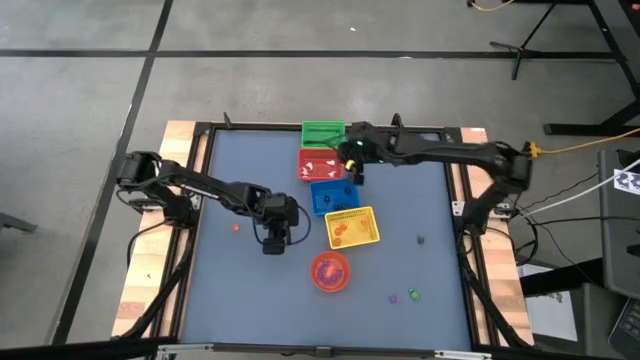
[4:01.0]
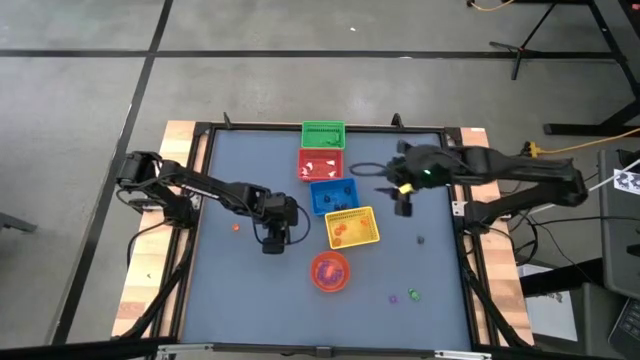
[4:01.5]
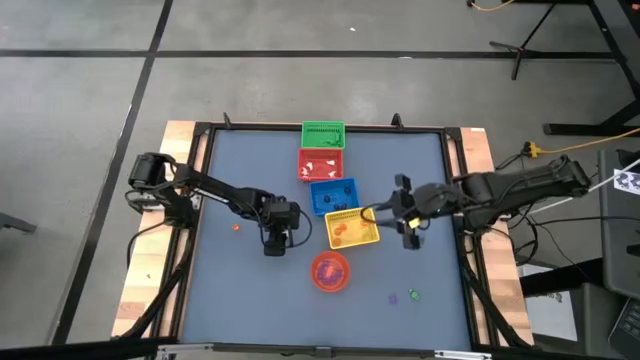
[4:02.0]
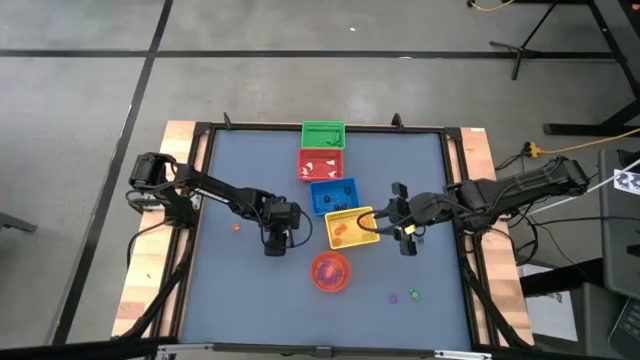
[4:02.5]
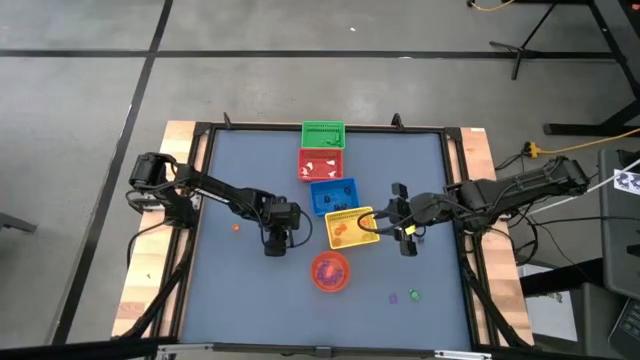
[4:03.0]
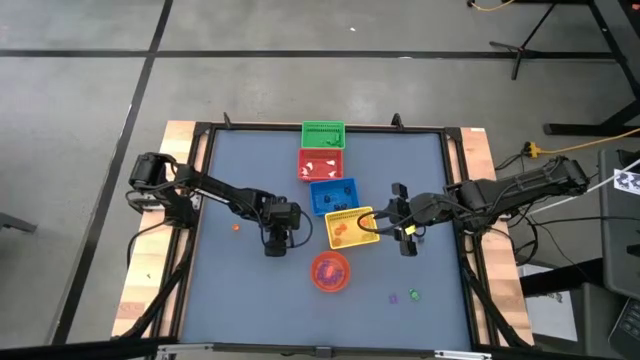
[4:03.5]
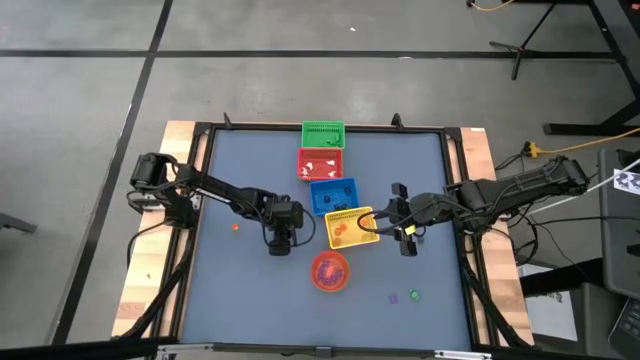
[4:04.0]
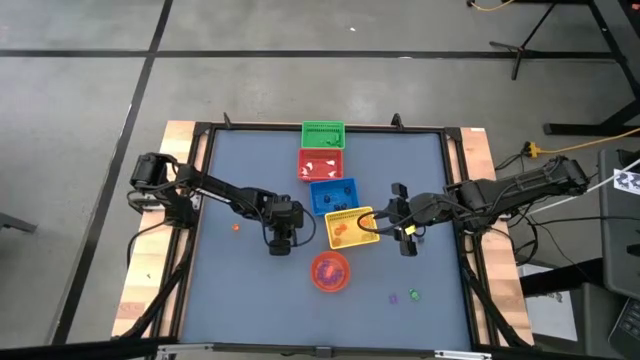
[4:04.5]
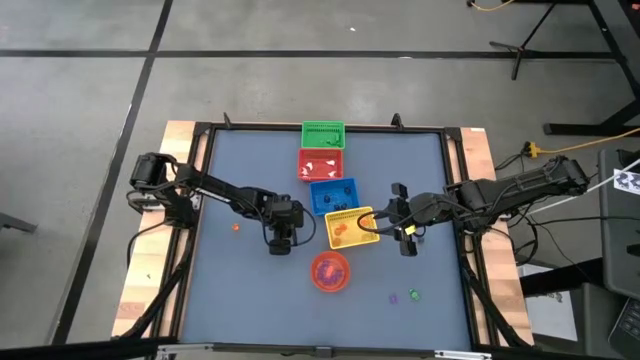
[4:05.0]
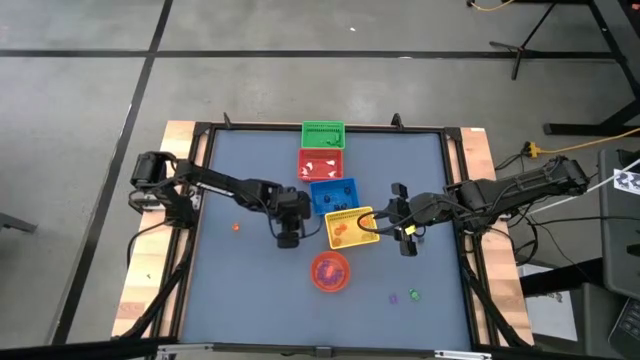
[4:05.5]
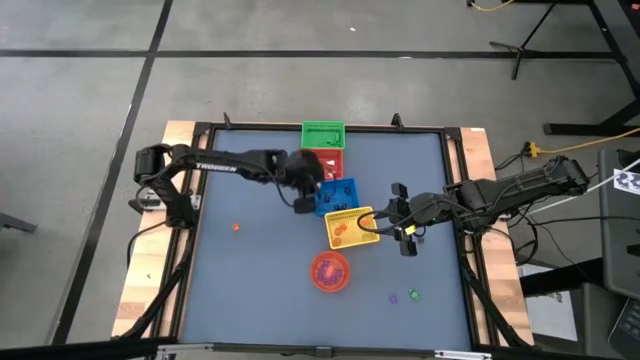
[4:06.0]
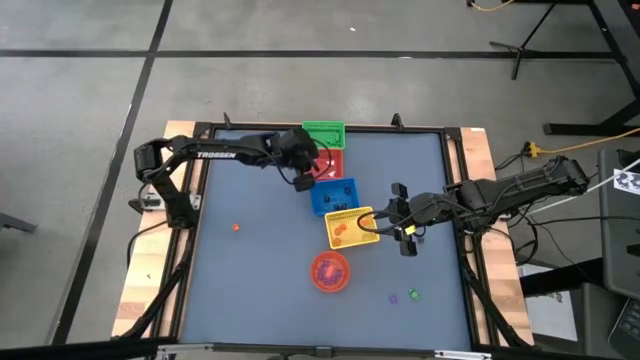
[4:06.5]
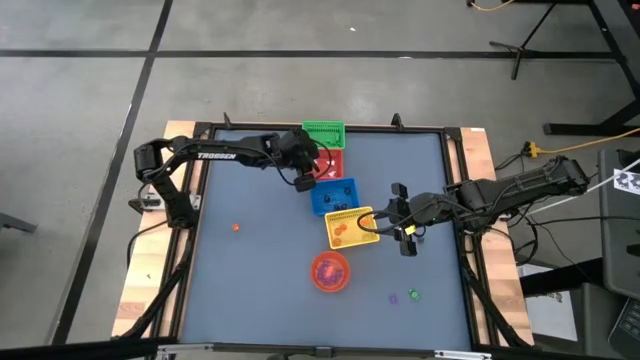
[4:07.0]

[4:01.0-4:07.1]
Task: Sort Halloween decoration
Put the white ghost toy into the red bin

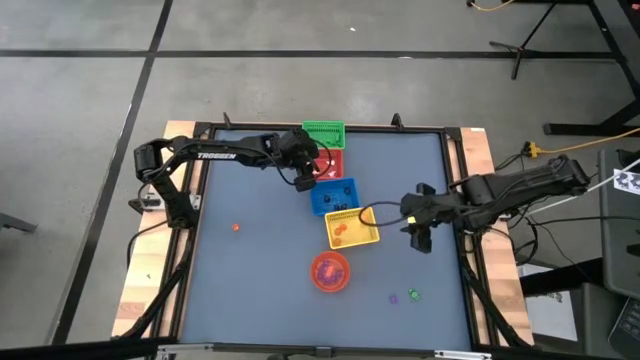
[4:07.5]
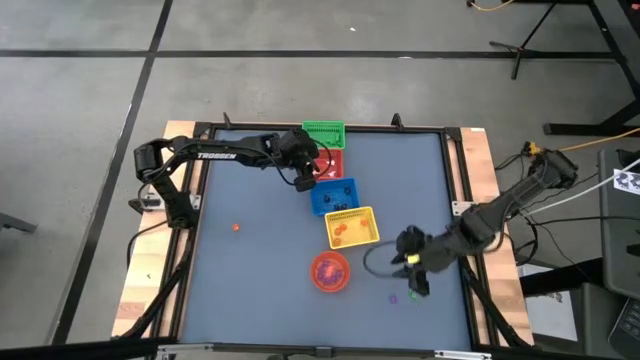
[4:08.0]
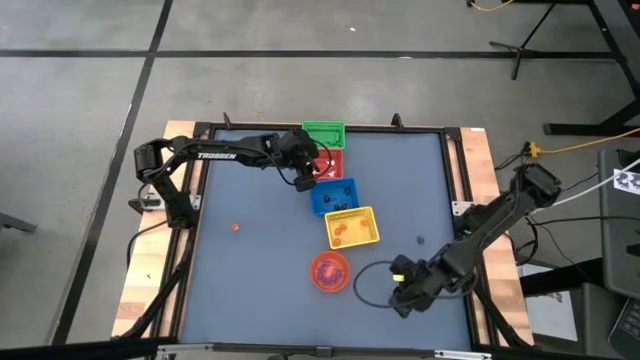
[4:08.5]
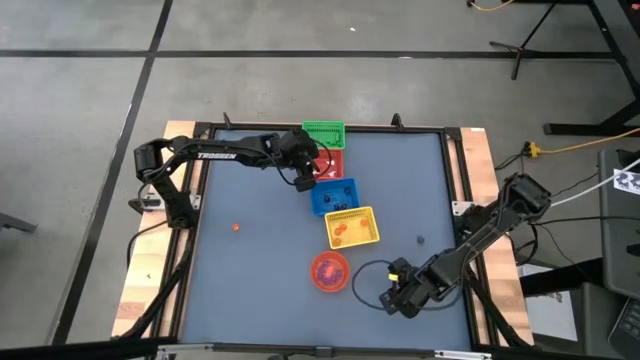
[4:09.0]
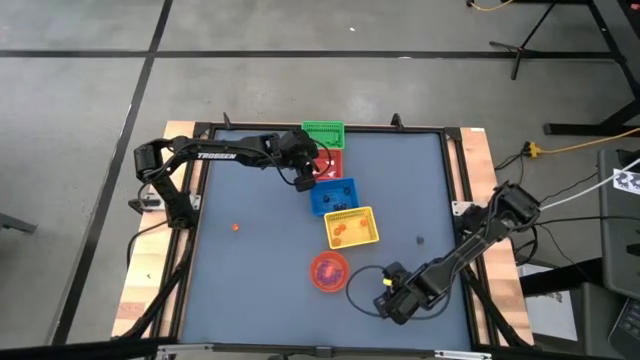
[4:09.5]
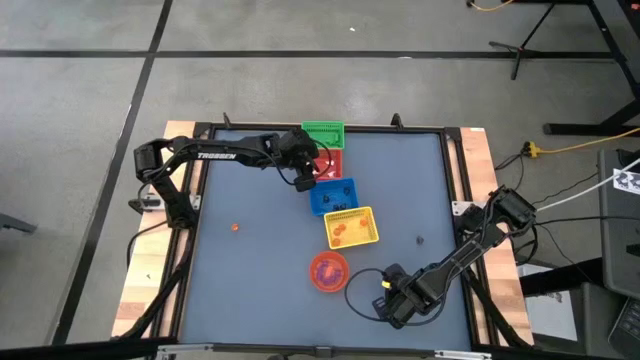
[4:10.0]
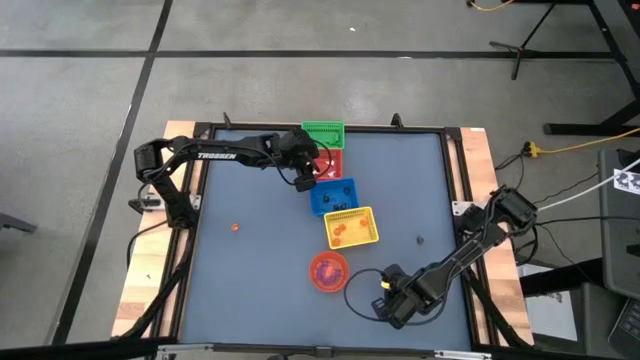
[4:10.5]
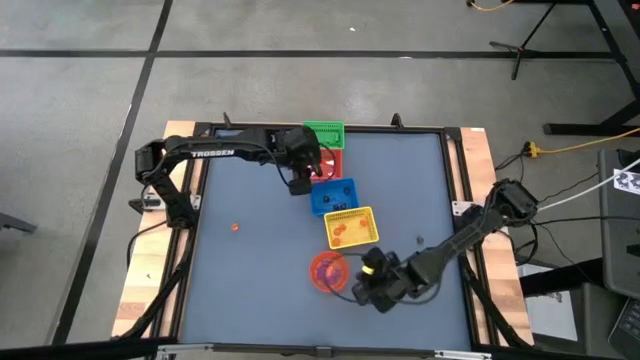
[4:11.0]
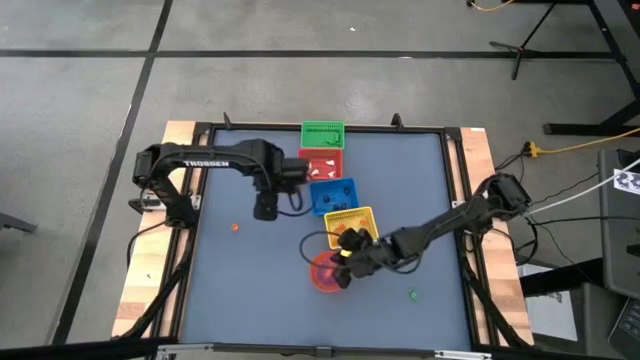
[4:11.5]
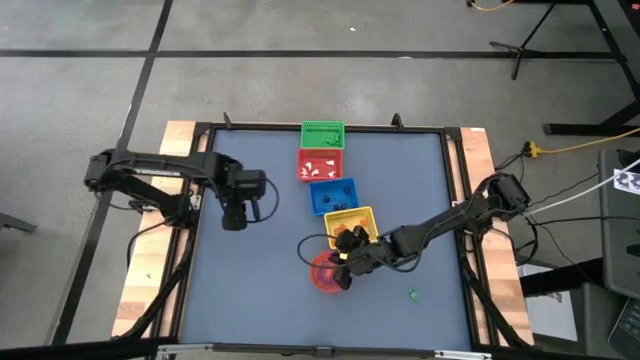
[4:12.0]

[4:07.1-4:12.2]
Put the purple spider toy into the orange bin

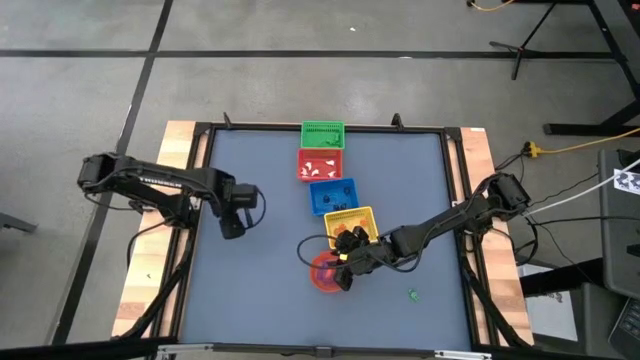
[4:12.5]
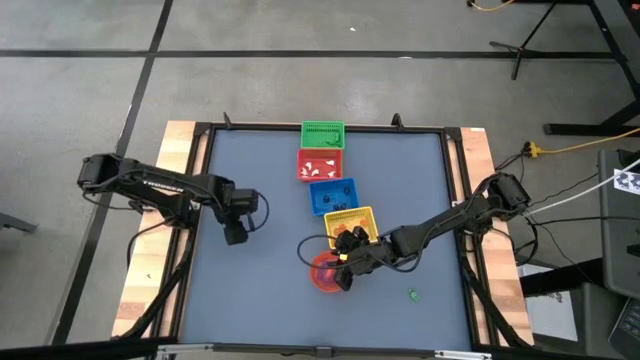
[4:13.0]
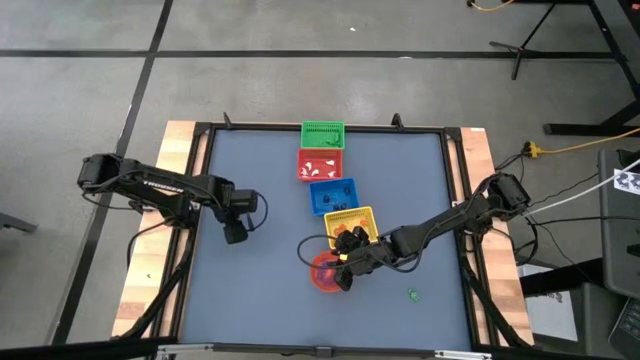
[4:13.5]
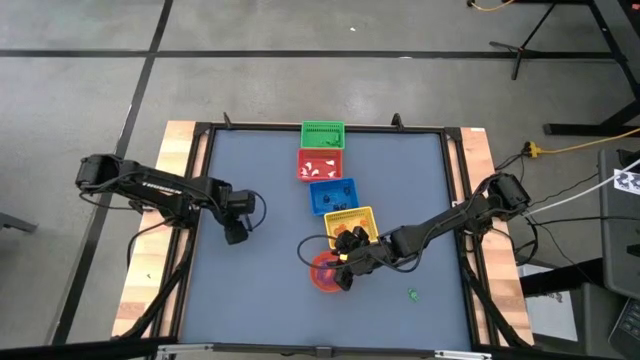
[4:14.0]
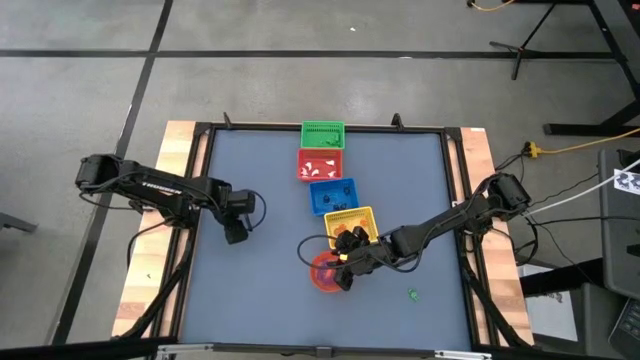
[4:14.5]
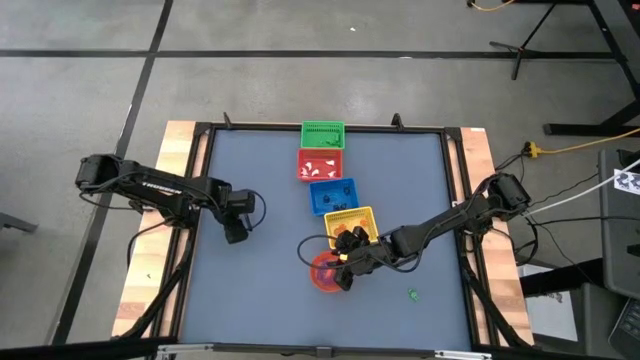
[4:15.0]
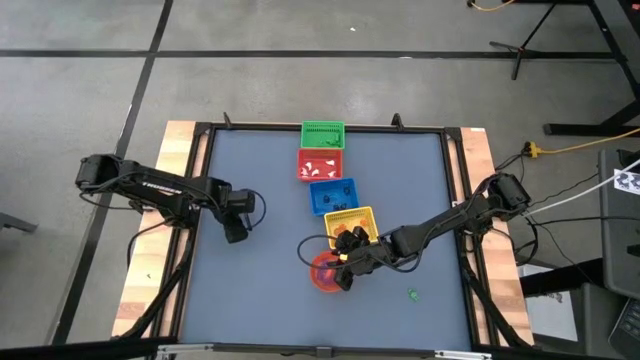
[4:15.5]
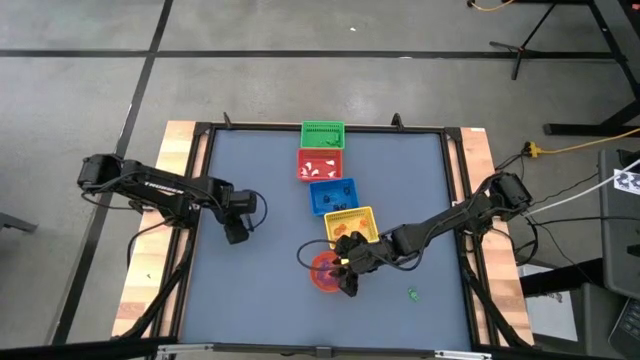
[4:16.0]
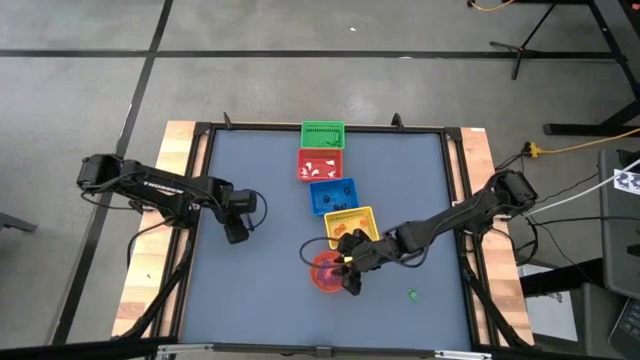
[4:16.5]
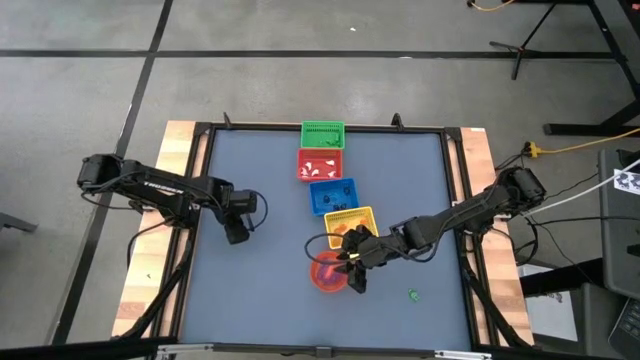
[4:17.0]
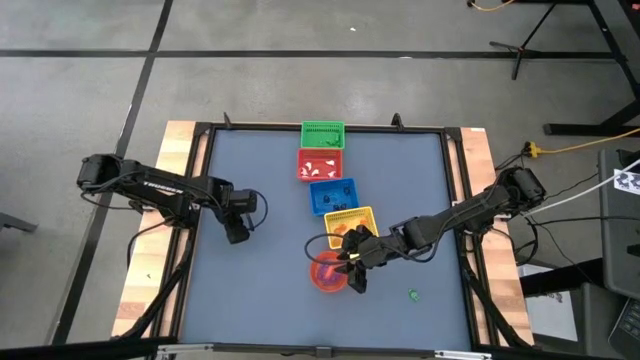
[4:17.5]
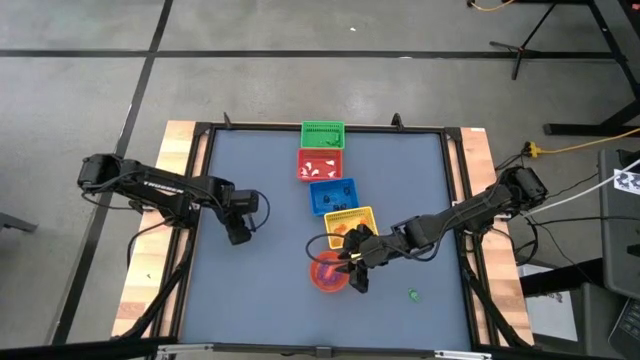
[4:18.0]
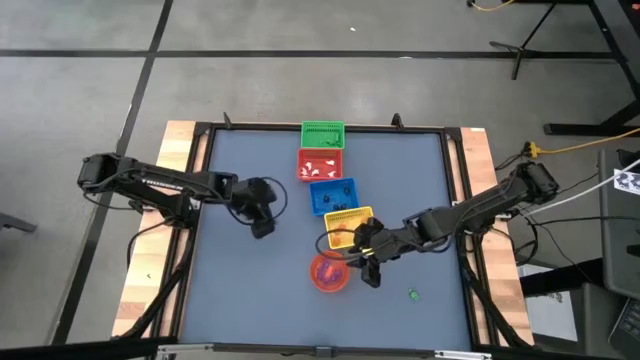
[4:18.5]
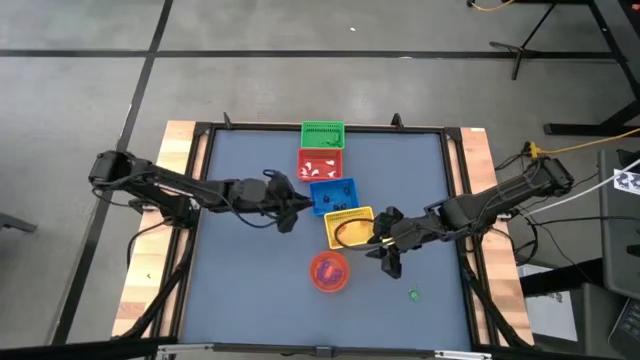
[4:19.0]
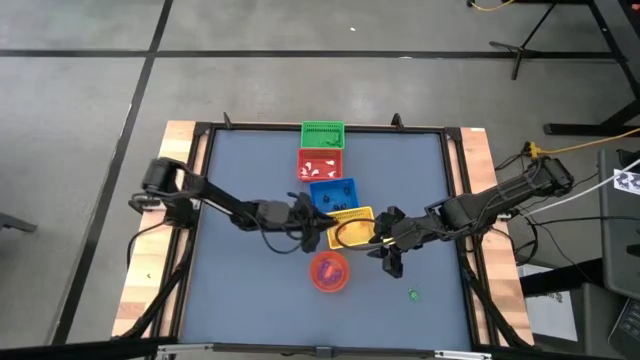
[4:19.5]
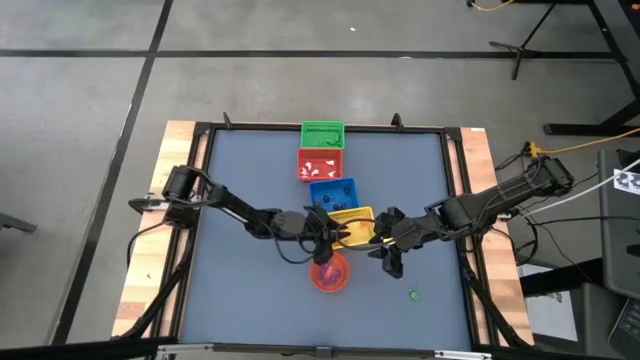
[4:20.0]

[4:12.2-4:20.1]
Put the orange pumpkin toy into the yellow bin

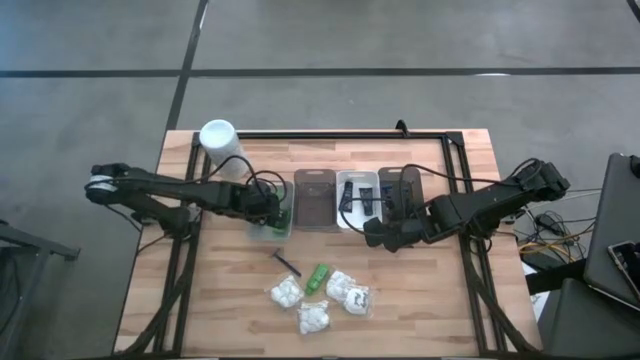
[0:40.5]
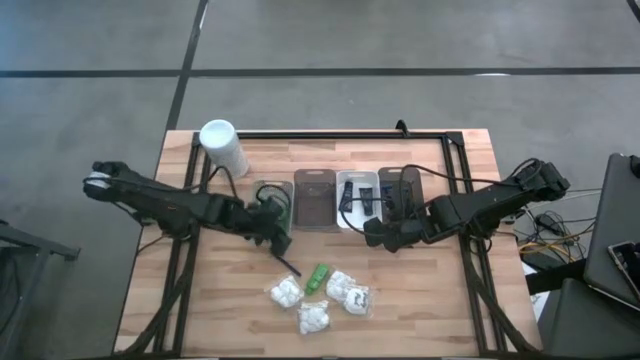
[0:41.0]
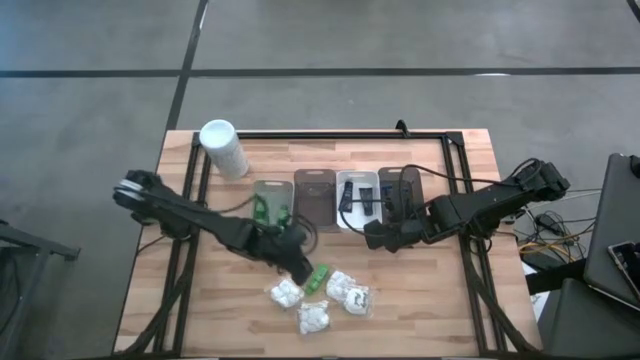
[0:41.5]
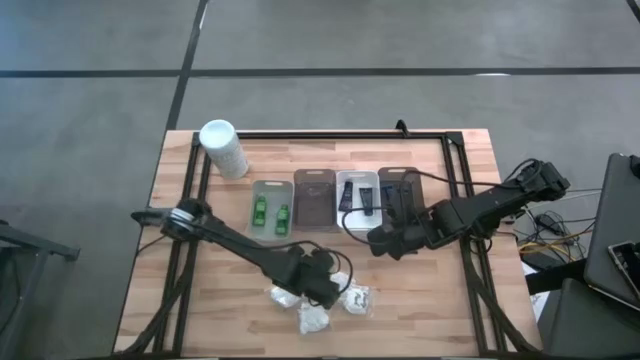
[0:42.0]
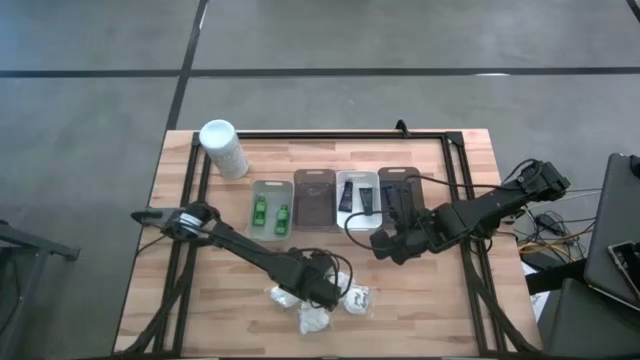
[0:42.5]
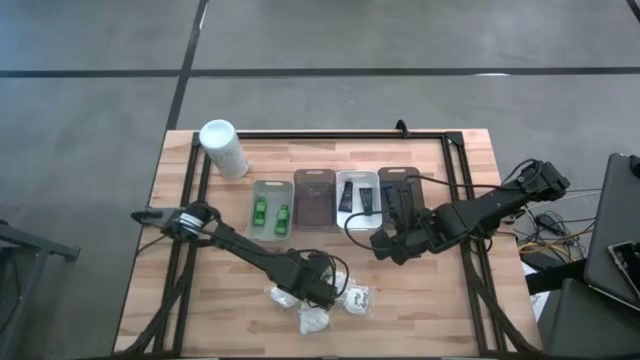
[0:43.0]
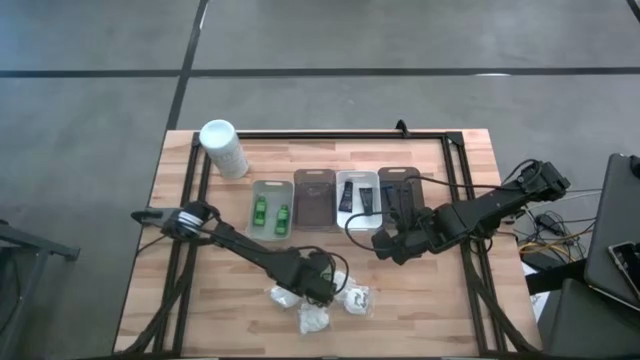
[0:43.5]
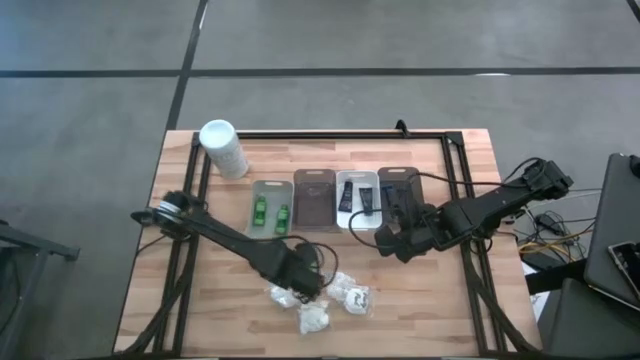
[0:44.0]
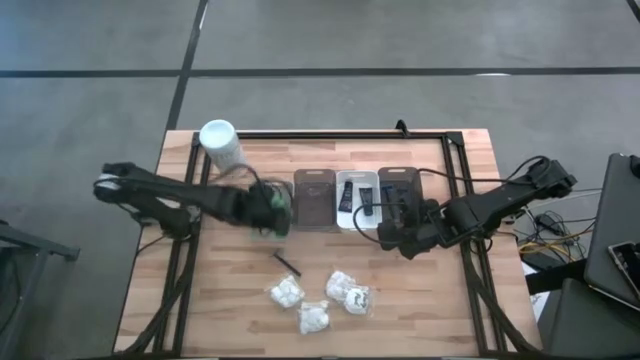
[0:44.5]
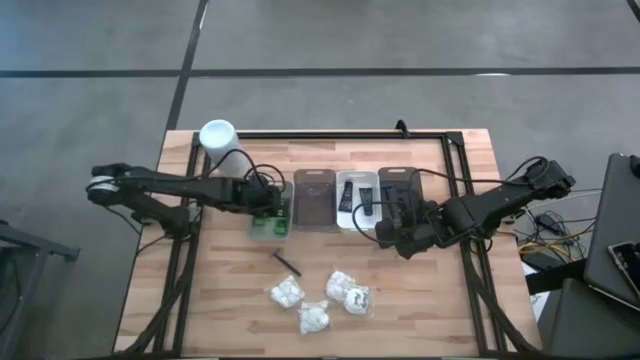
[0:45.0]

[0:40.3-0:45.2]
Task: Pick & Place Travel size toiletries
Put the green shampoo into the gray bin
